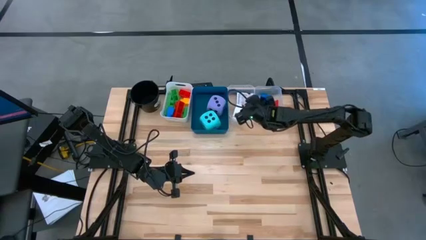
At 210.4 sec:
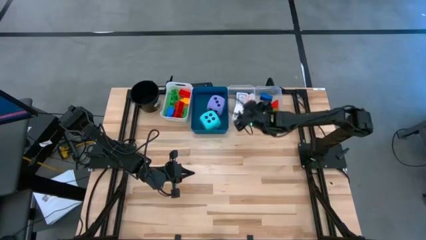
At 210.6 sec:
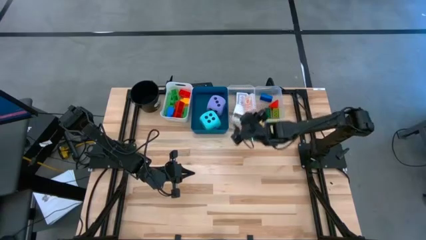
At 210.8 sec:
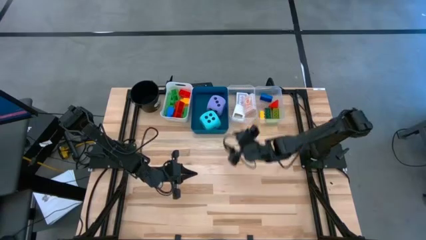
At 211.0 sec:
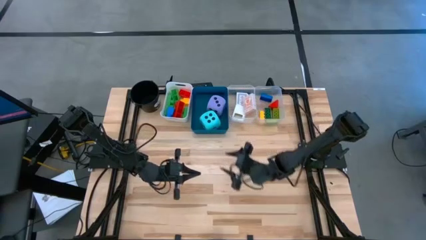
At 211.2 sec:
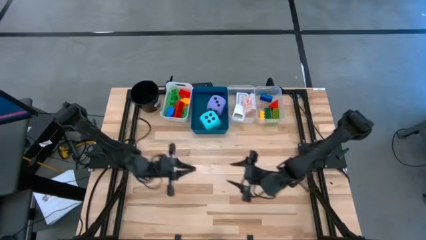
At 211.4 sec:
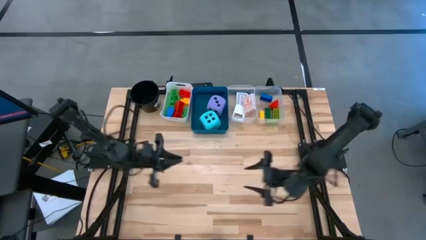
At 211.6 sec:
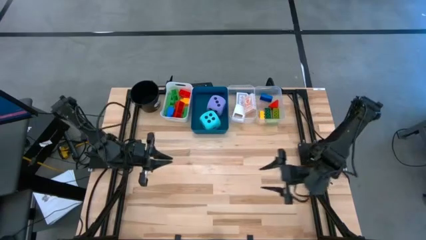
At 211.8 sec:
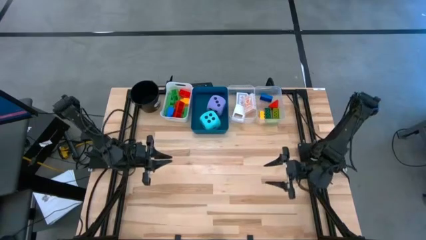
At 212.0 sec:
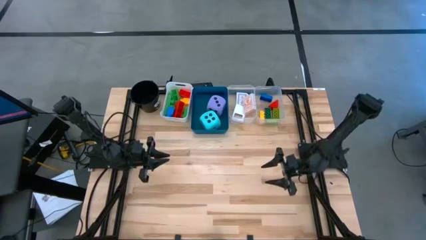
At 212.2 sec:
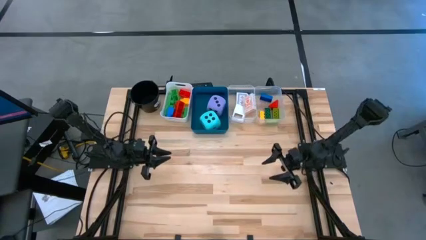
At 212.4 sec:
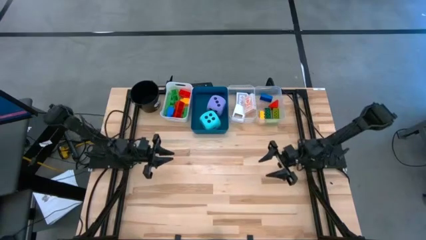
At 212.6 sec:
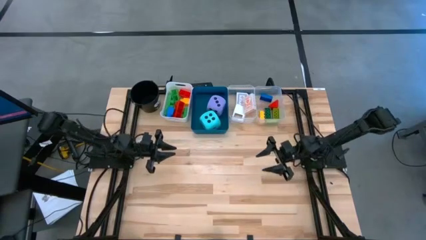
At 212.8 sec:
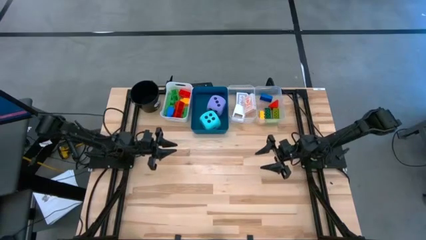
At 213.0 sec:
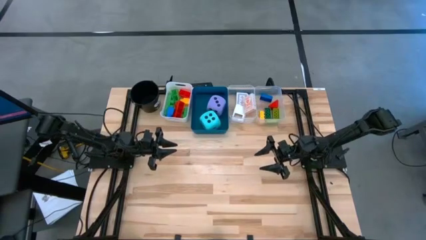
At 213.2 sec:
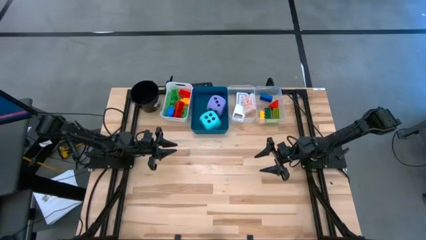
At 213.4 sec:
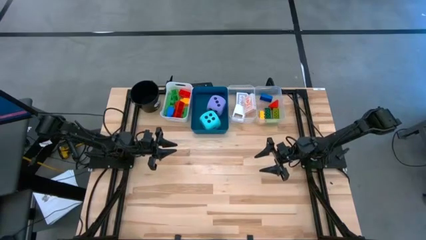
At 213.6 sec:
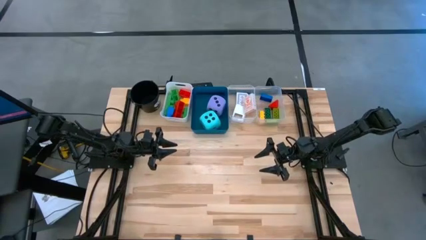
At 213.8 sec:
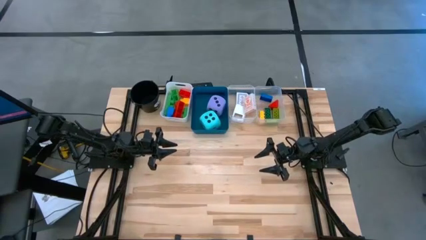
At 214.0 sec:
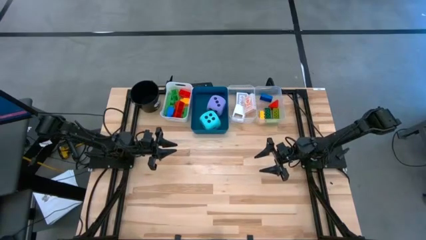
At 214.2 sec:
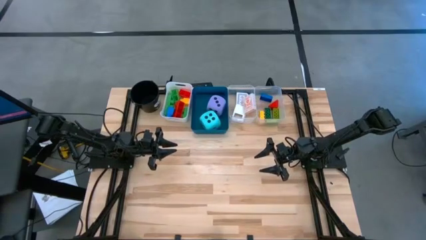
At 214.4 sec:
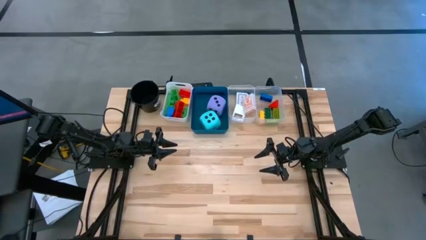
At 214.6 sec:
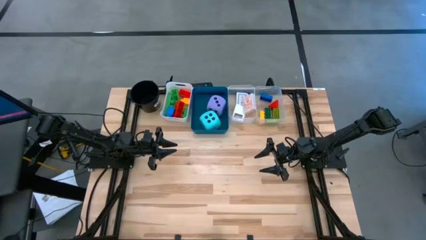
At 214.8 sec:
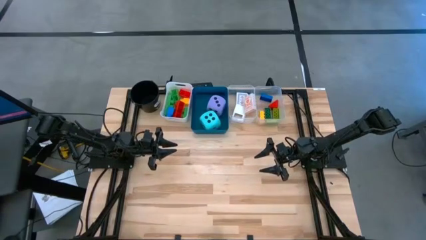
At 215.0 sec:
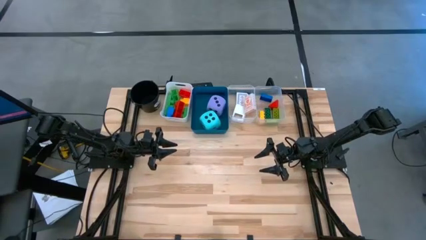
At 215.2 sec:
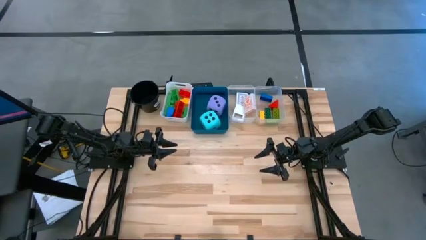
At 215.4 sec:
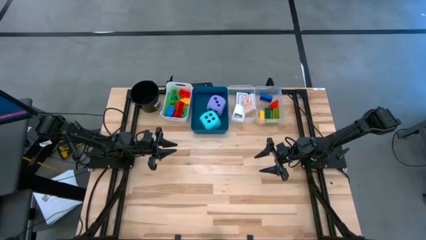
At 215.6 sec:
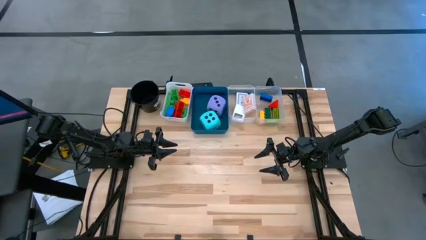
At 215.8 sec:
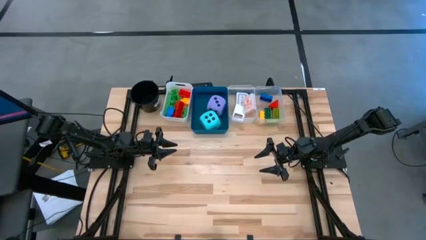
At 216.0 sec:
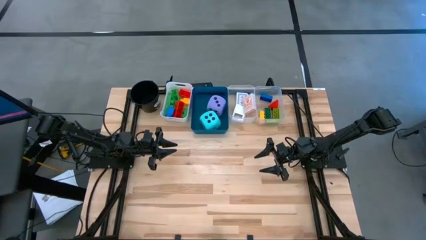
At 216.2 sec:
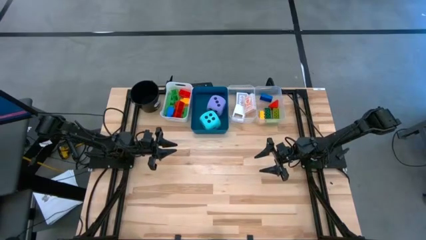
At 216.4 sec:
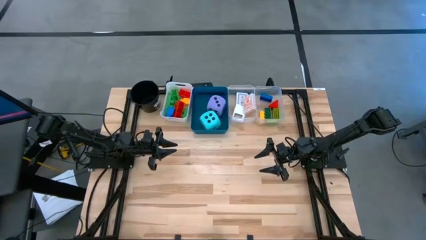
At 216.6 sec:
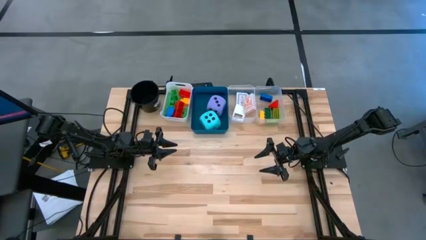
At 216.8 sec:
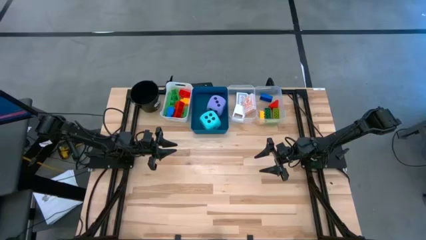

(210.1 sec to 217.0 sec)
Task: Pick & Place Toys
Return to Home Position

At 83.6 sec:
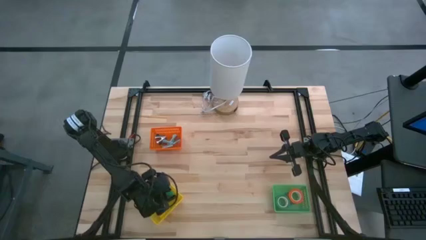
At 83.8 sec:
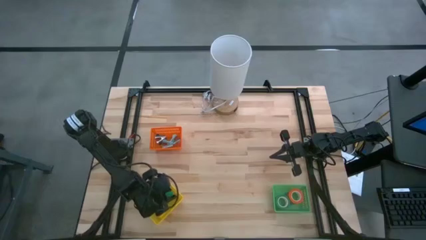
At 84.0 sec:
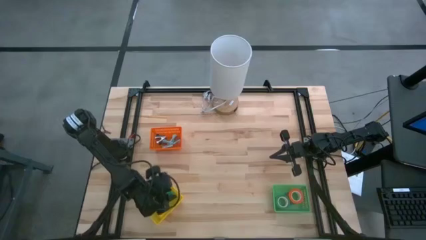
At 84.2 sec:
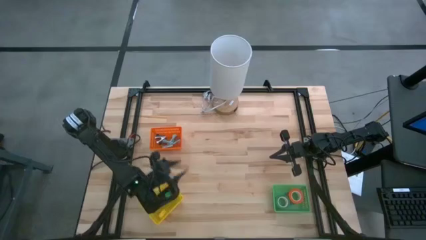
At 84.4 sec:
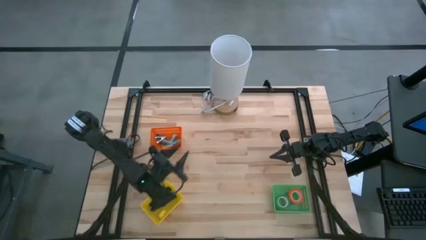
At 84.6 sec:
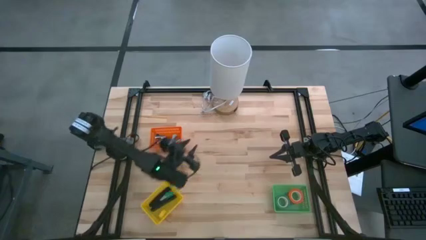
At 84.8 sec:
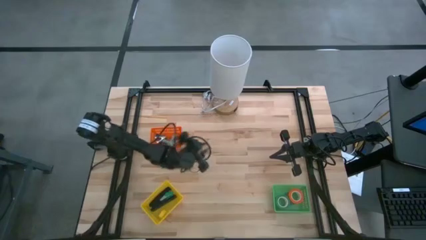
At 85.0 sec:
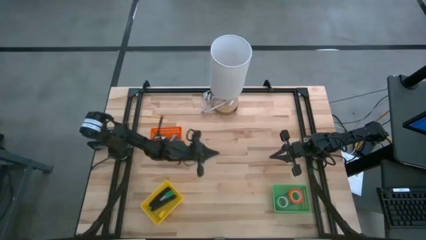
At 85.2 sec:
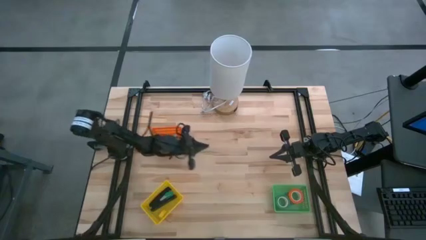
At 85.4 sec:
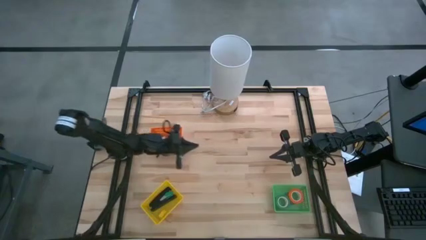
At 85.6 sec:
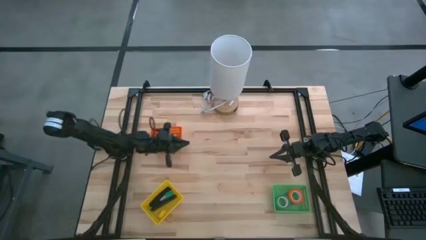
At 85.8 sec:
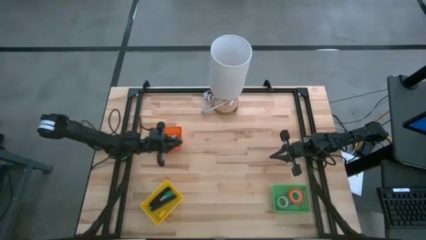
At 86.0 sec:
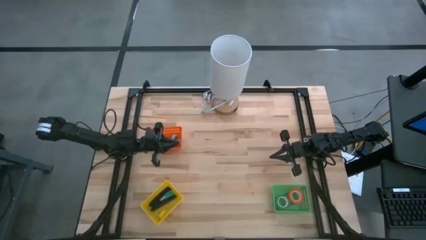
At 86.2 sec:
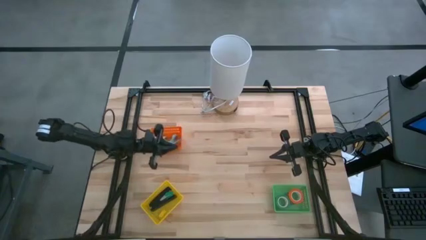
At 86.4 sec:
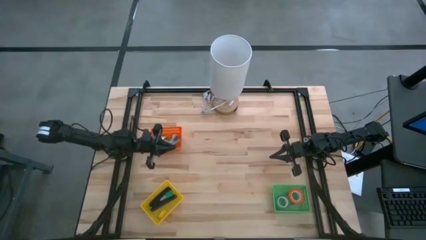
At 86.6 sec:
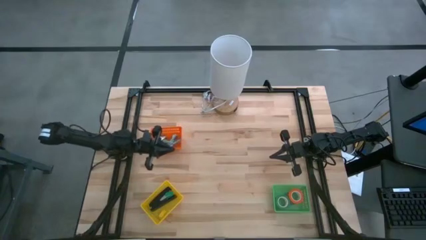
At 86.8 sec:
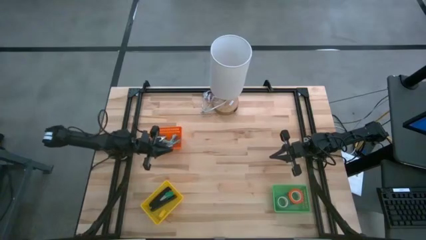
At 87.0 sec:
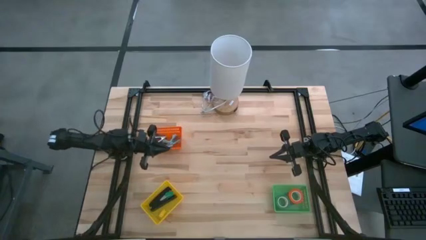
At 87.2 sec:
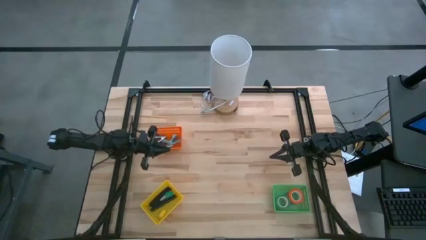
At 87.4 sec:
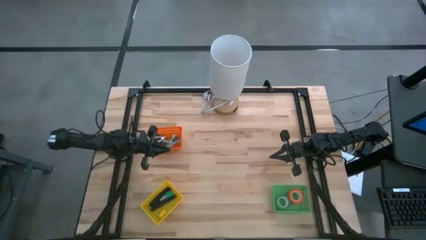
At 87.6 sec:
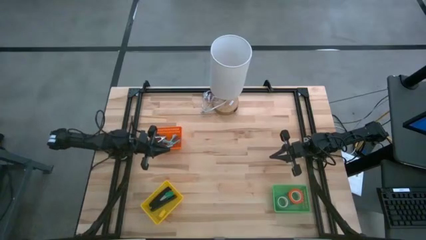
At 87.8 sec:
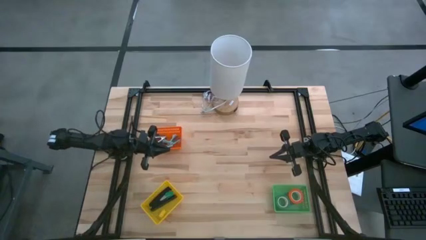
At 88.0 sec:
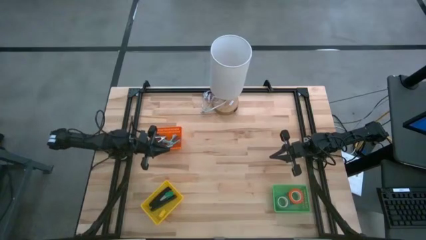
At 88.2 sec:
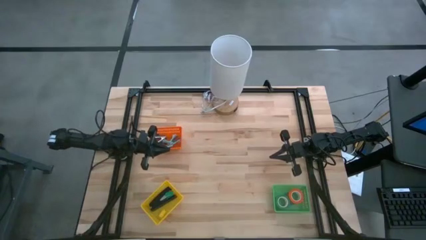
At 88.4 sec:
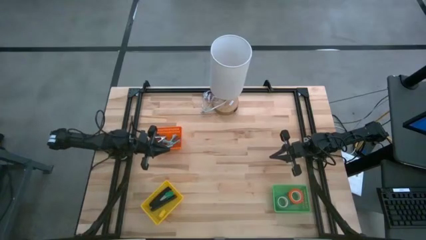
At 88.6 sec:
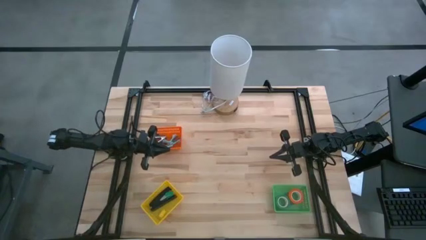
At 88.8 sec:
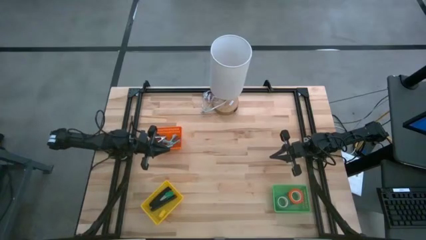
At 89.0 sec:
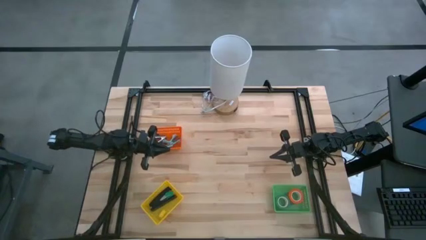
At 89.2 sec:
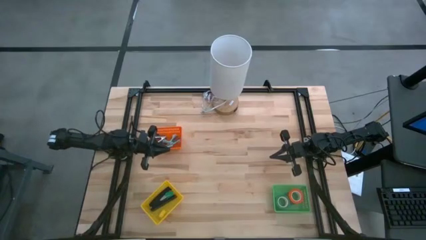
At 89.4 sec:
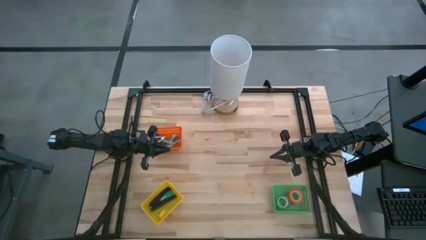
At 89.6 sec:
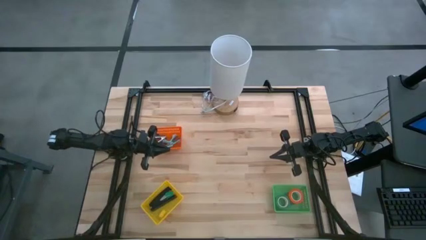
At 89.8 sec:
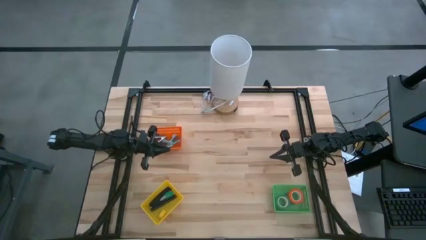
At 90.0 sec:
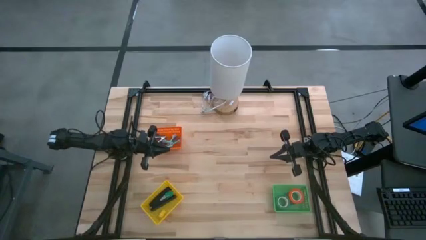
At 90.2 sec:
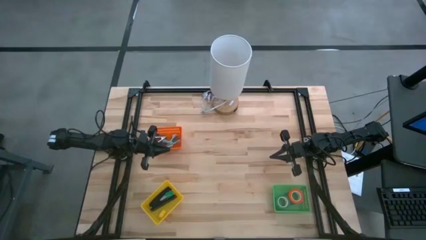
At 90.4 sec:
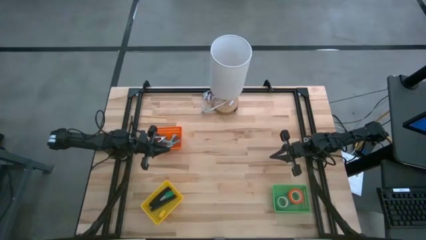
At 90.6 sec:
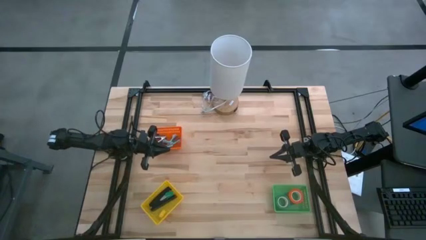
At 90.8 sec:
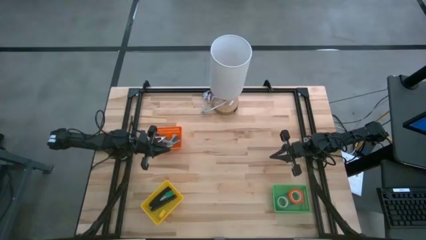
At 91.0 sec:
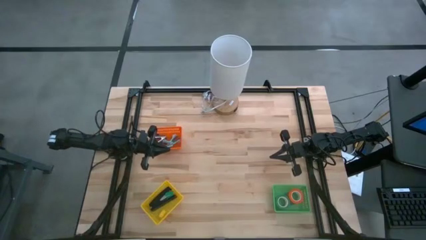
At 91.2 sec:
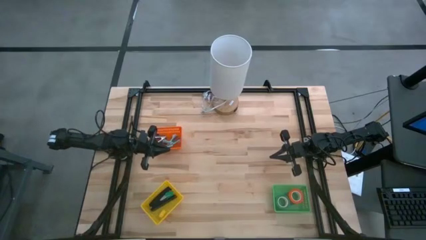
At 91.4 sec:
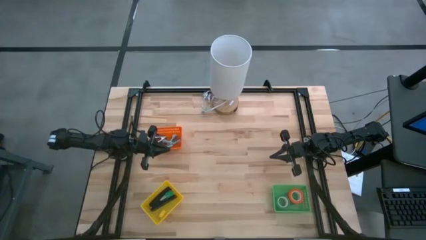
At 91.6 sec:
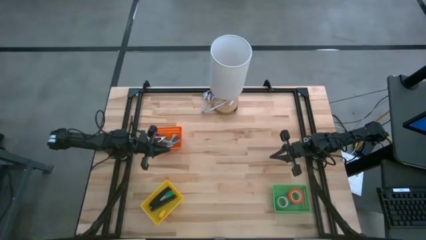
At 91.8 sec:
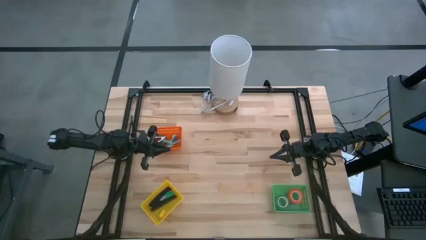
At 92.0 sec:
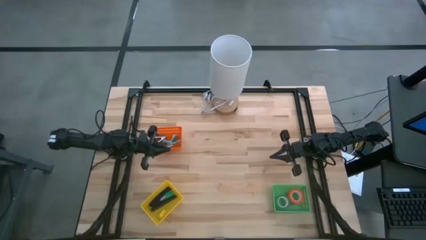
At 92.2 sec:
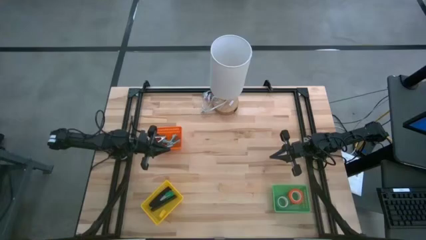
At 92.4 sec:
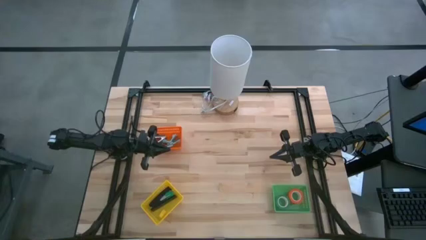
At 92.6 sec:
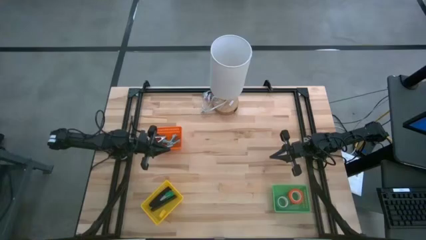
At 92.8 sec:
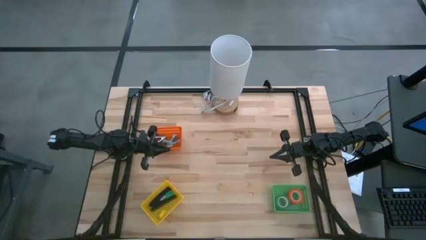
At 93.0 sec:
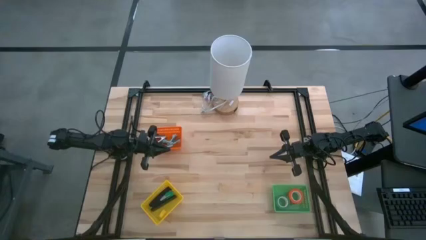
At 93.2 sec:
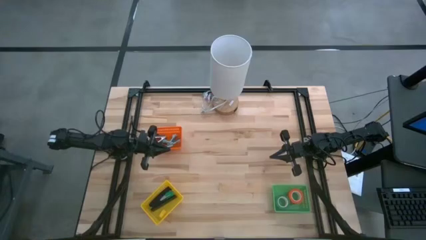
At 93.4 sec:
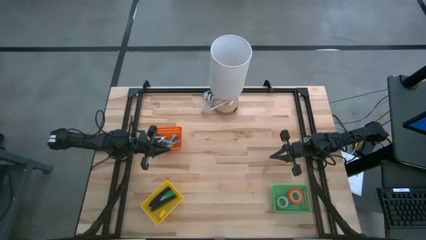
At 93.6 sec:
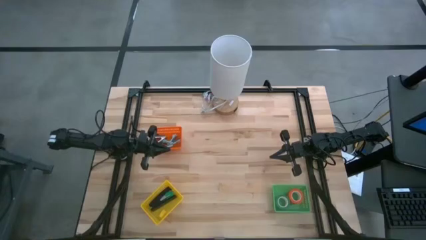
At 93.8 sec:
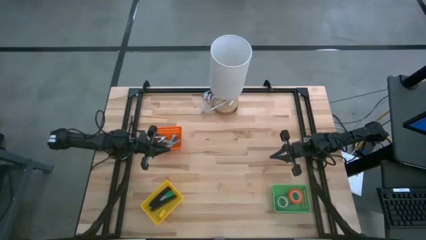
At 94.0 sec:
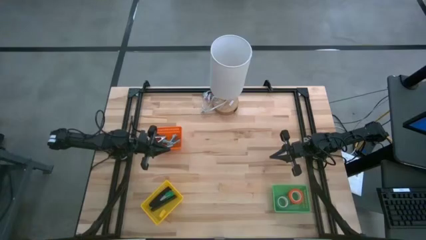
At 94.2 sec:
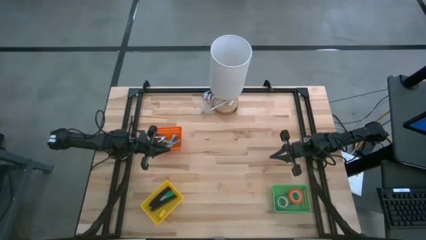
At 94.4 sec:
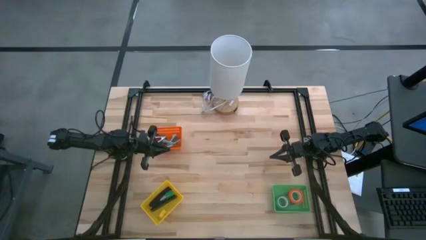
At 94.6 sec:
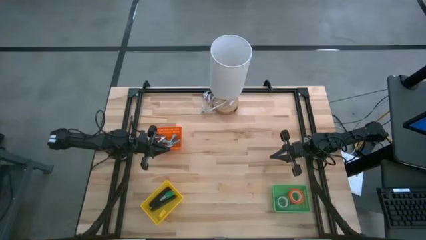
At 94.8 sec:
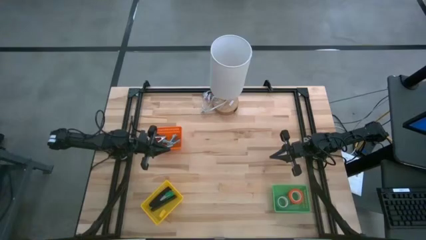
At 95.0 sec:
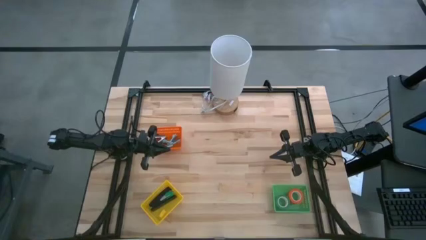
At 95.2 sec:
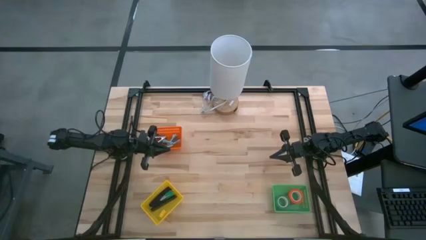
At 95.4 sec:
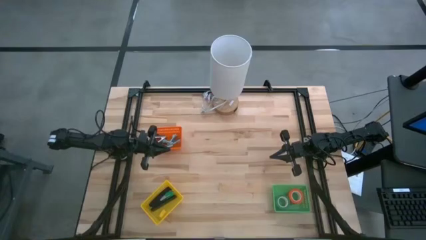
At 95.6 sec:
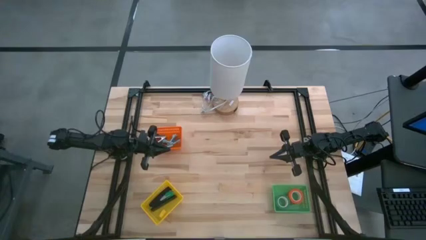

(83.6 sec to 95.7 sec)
Task: Pick and place Stapler, Stapler remover, tape
Return to Home Position
